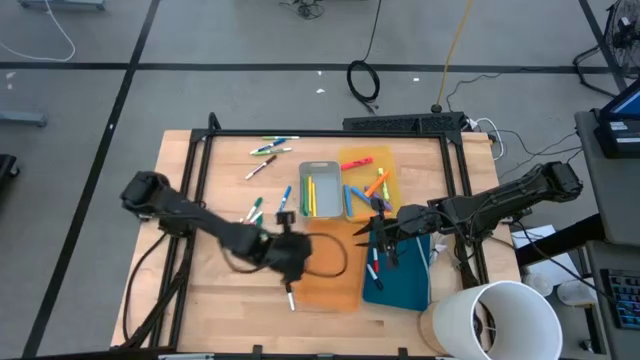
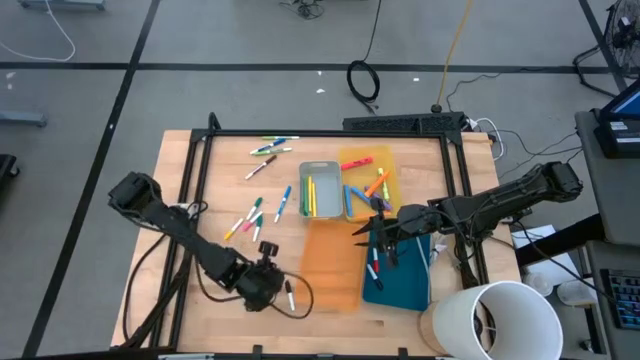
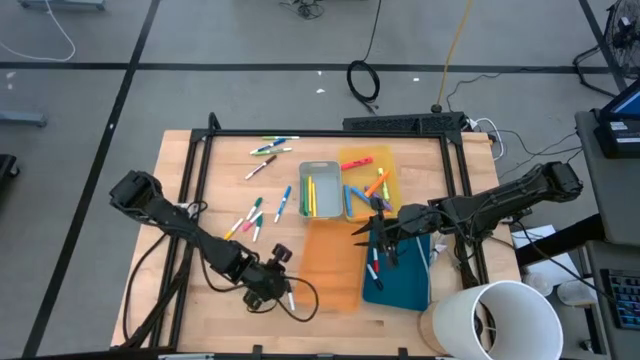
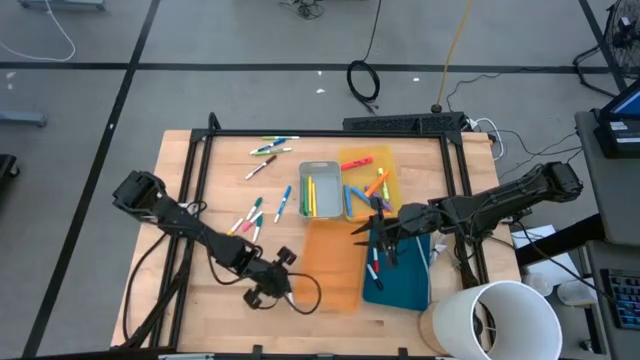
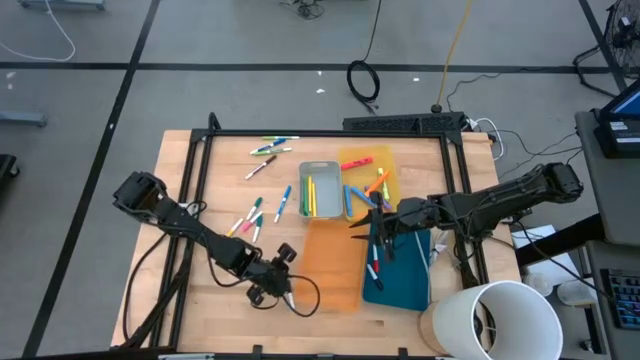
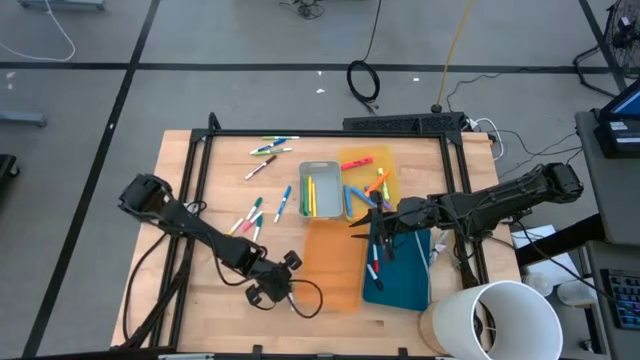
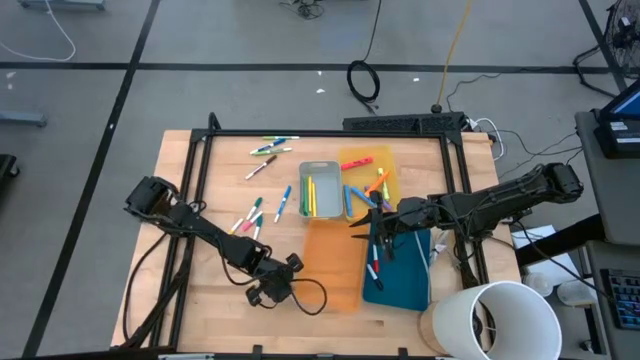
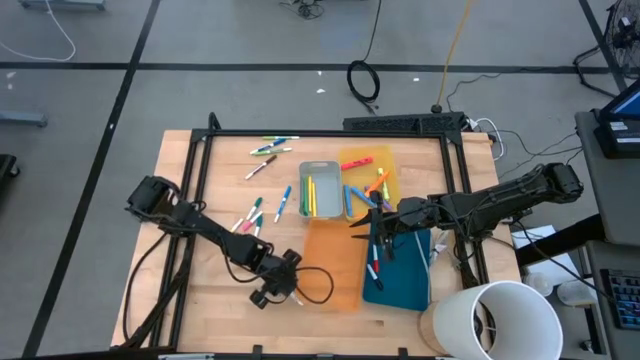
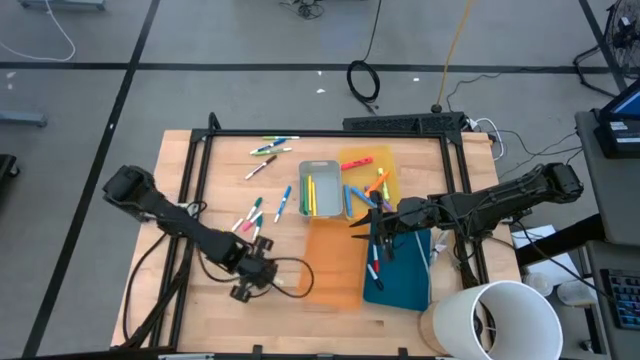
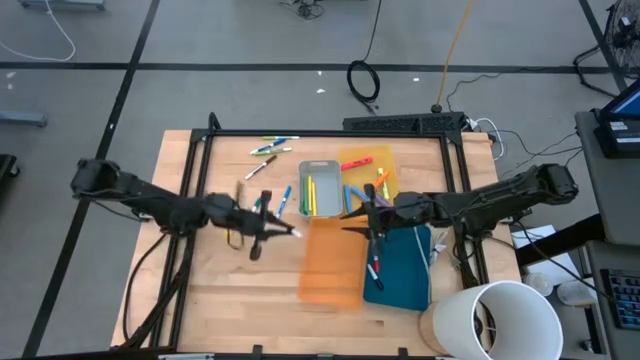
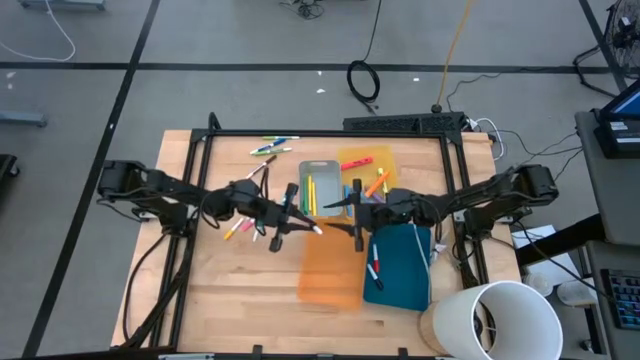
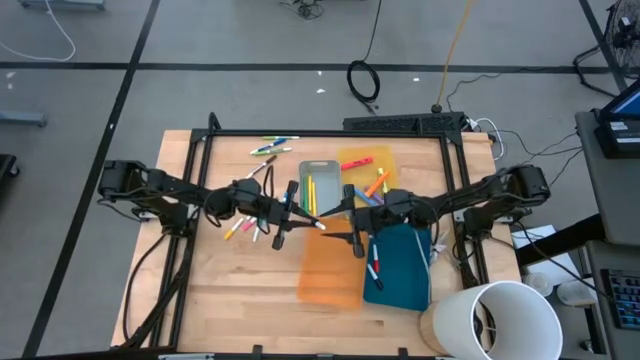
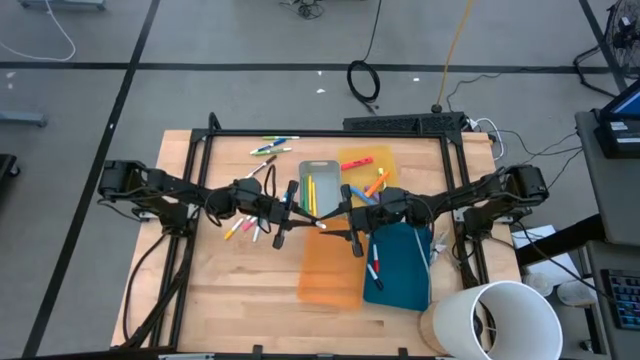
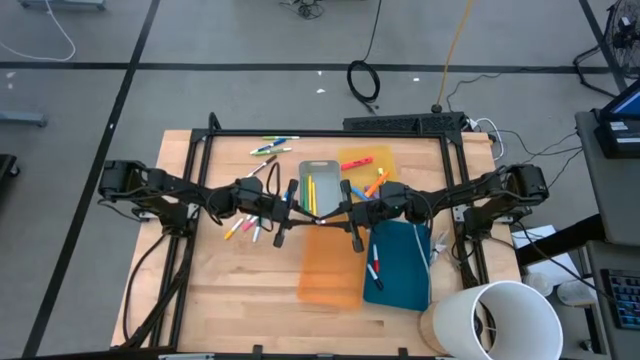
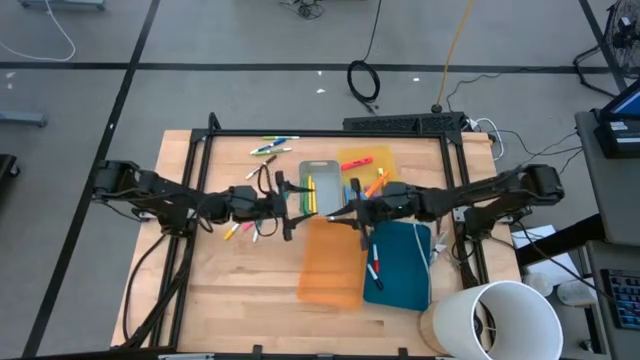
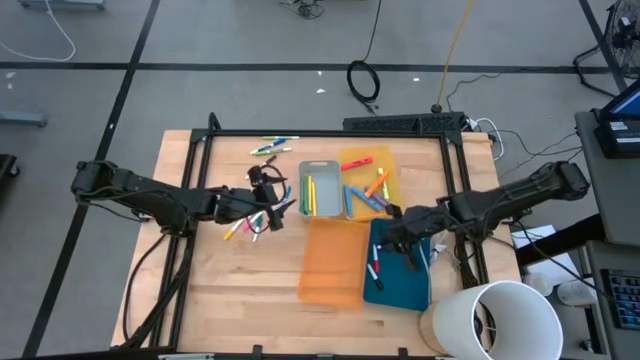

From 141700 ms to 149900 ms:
Task: Pick & Place Markers
Put the white and black highlighter pen into the blue bin

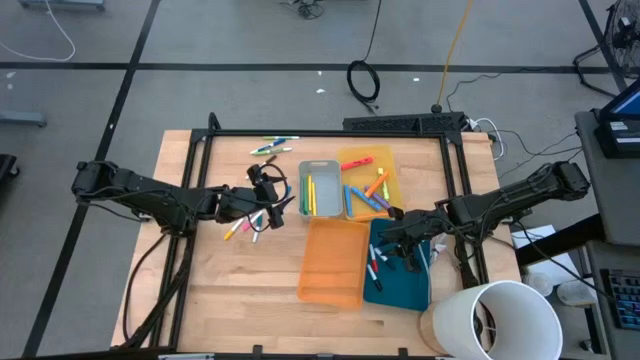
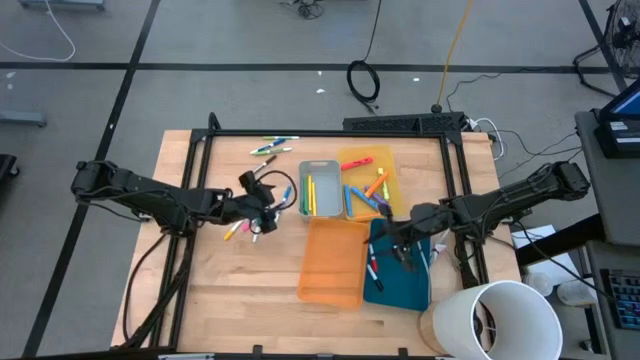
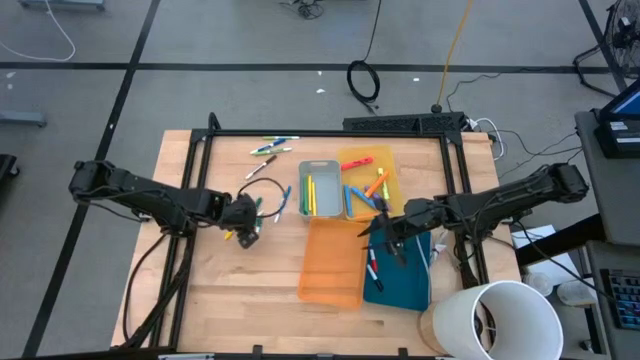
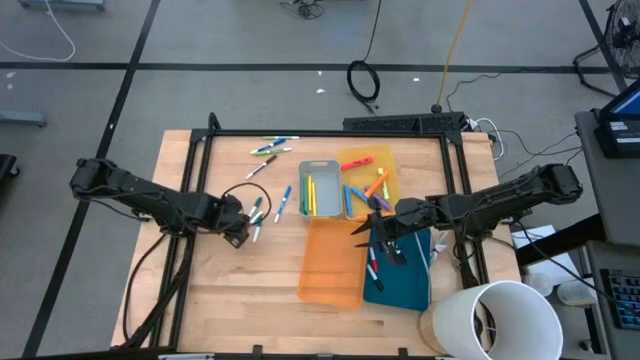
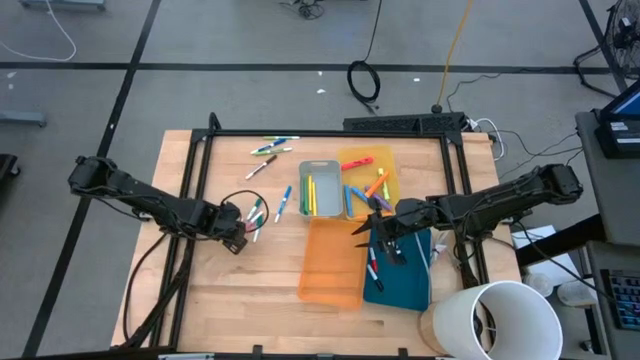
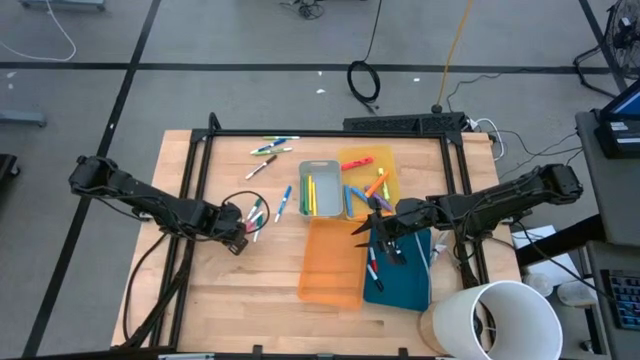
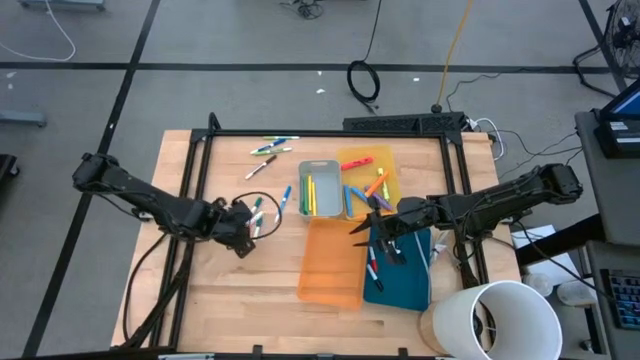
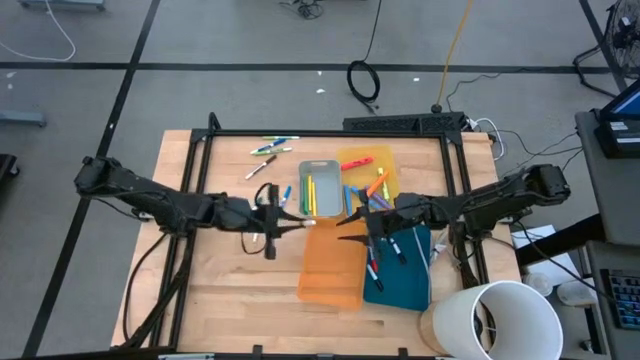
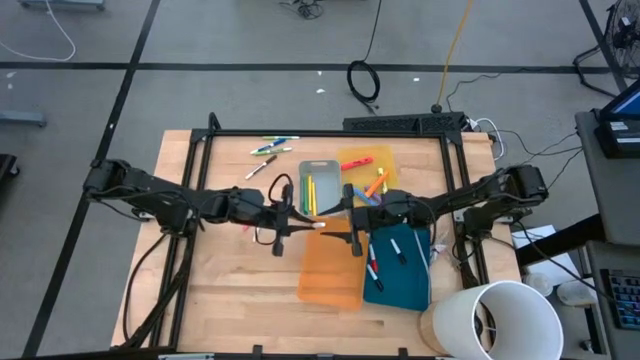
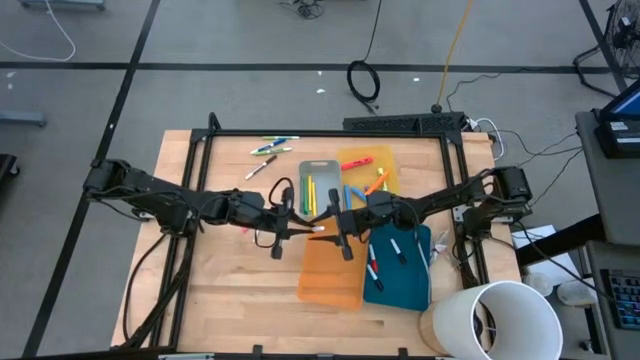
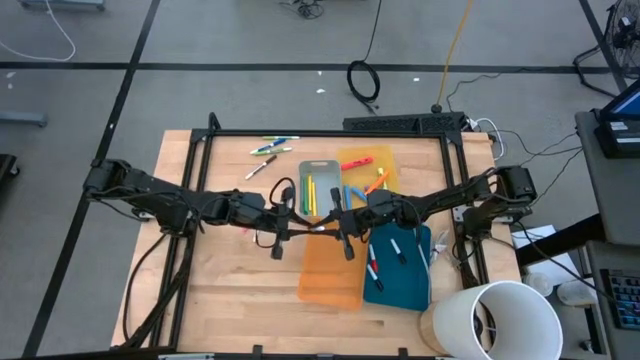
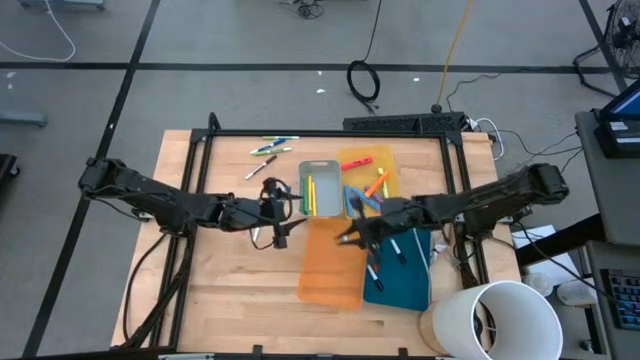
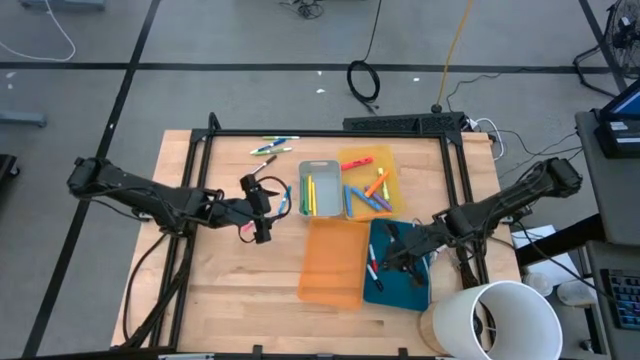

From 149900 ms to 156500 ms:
Put the white and yellow highlighter pen into the blue bin

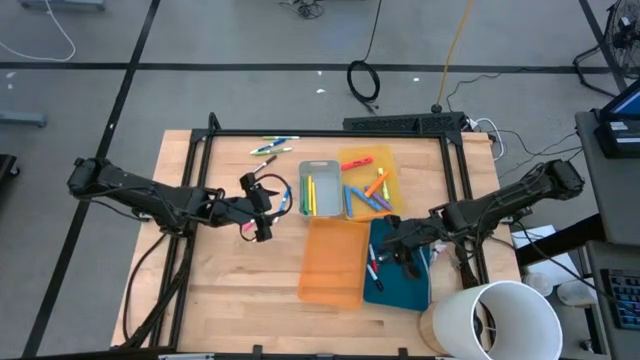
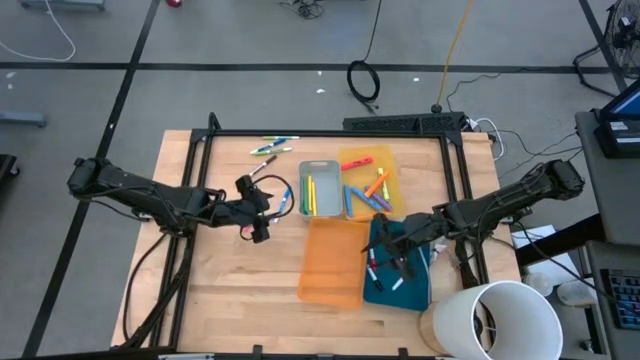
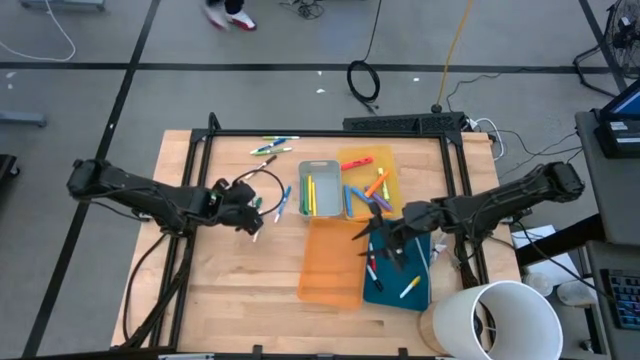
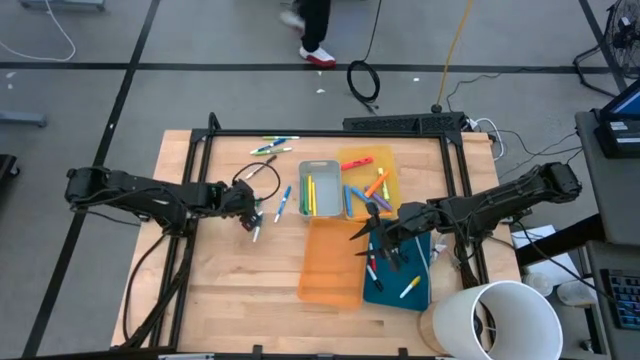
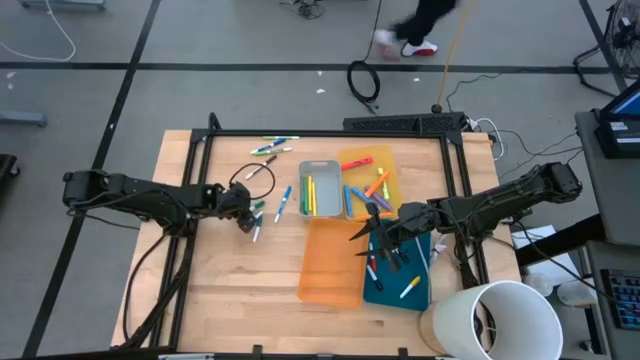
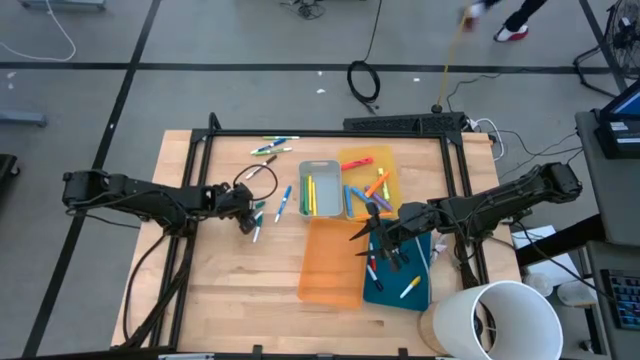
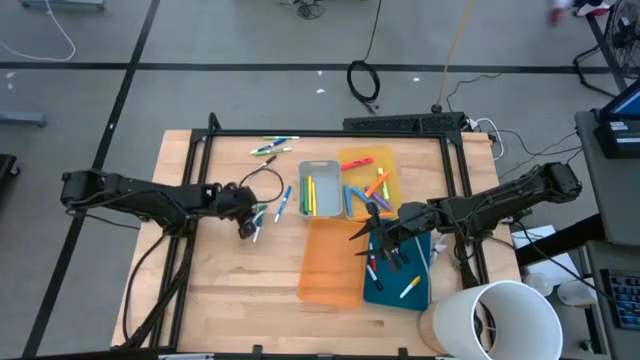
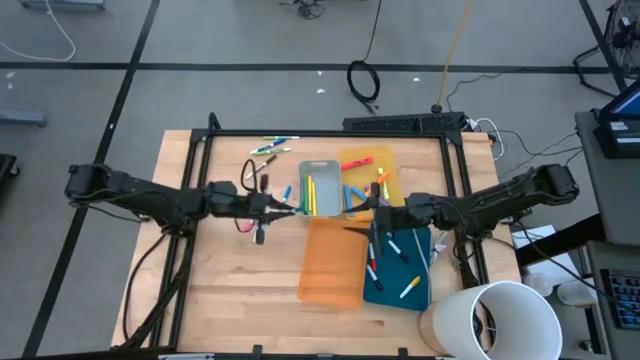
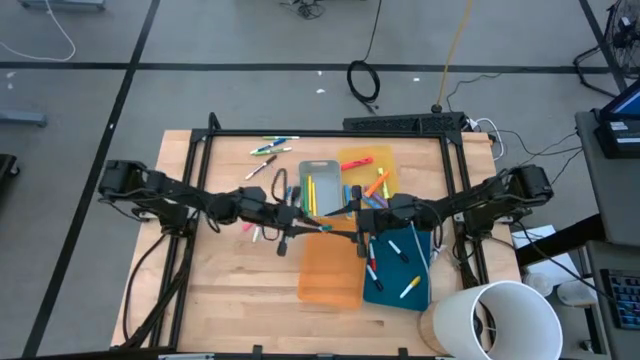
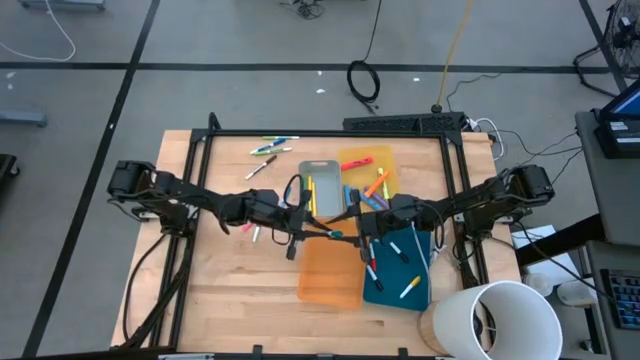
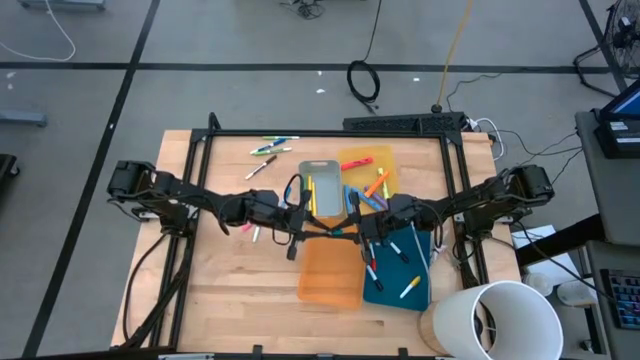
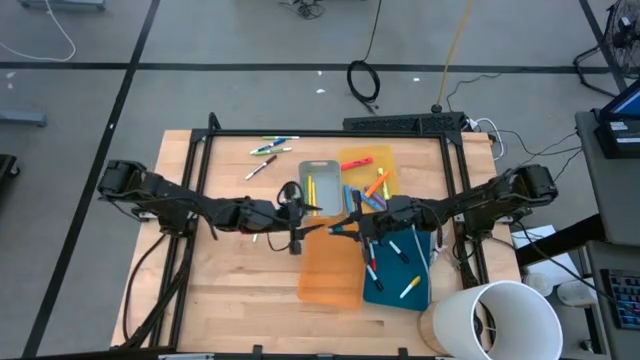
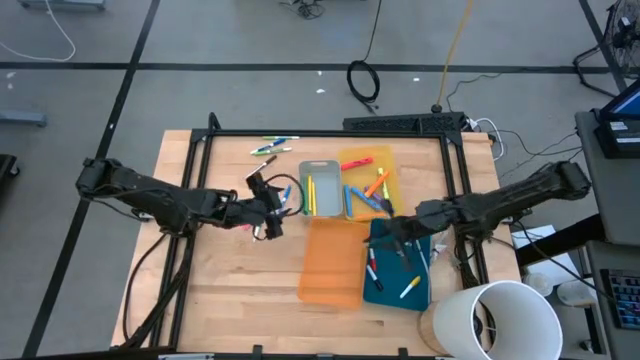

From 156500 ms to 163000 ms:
Put the white and green highlighter pen into the blue bin

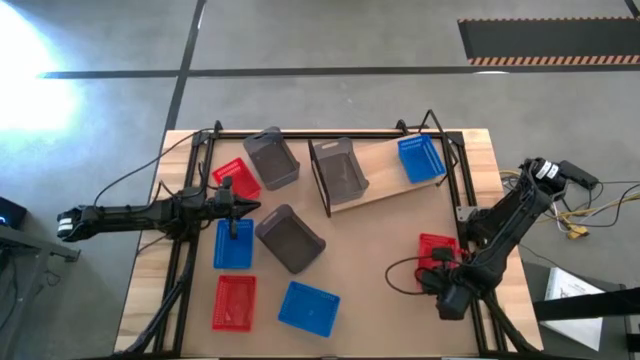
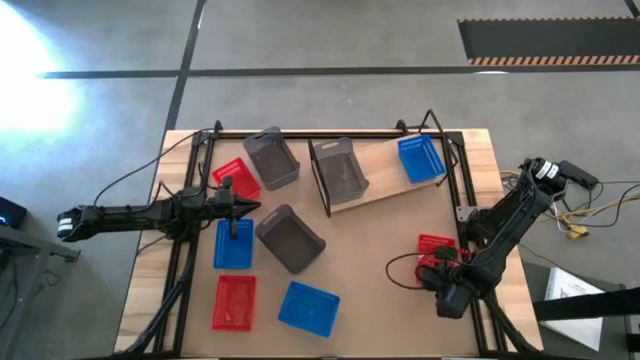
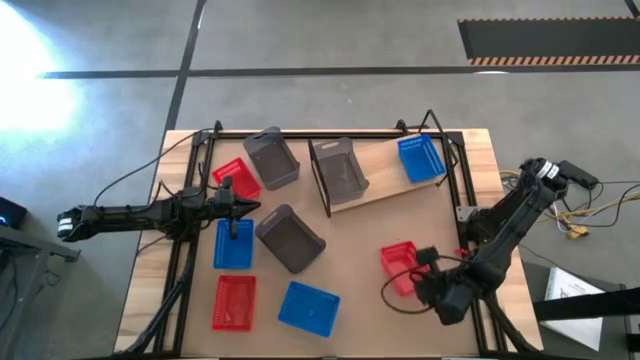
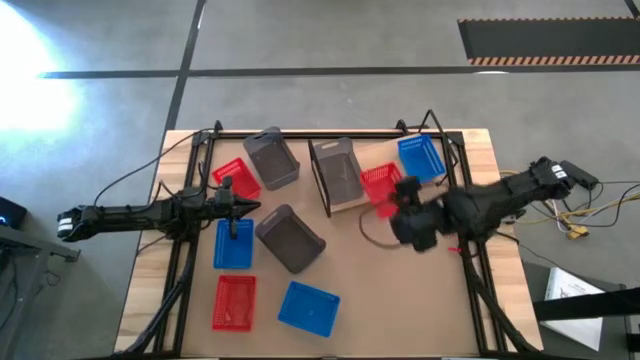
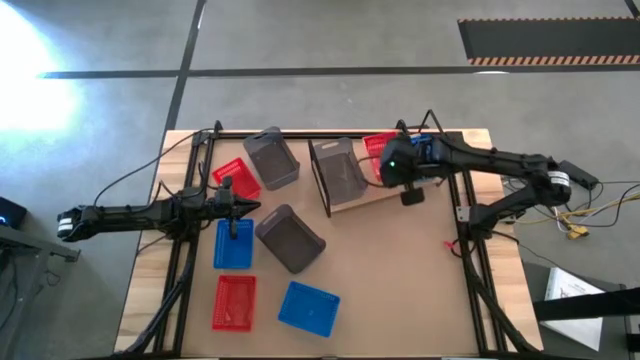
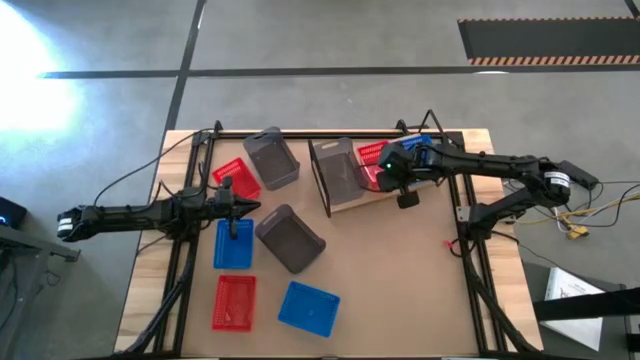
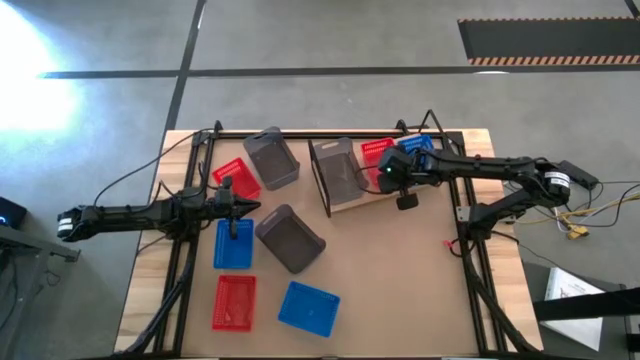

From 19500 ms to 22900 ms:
Task: Stack baskets on shelf by color
Put the bottom right red bin on the shelf
